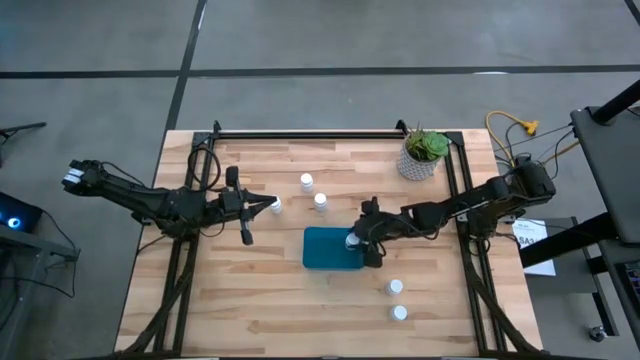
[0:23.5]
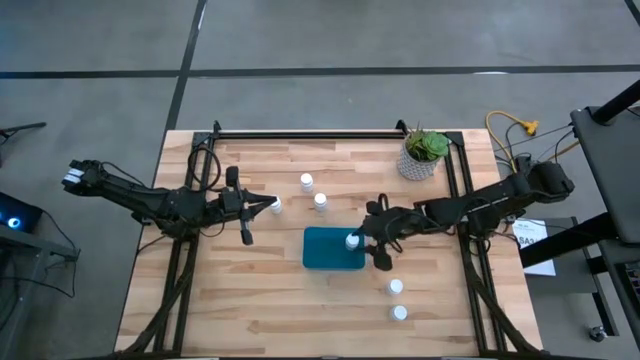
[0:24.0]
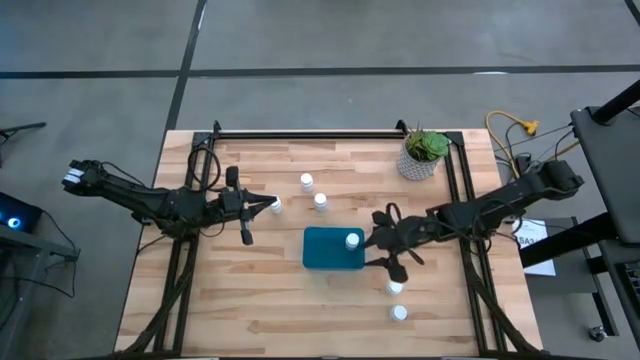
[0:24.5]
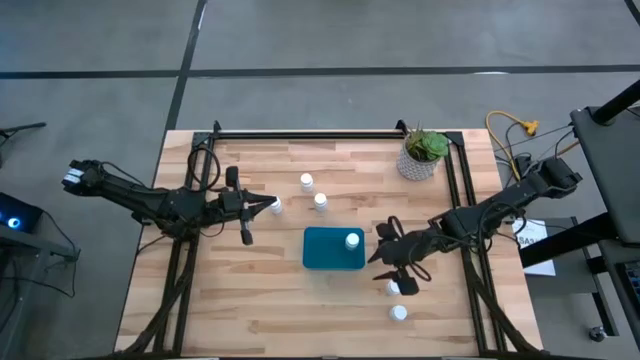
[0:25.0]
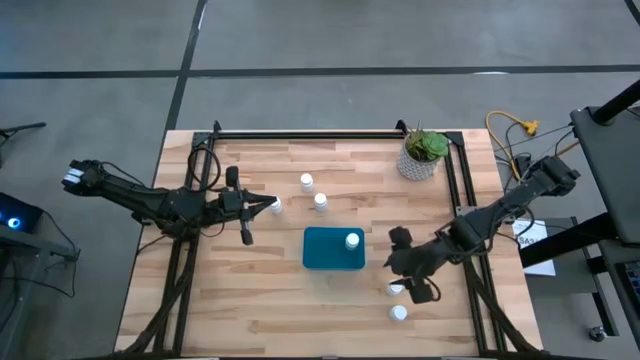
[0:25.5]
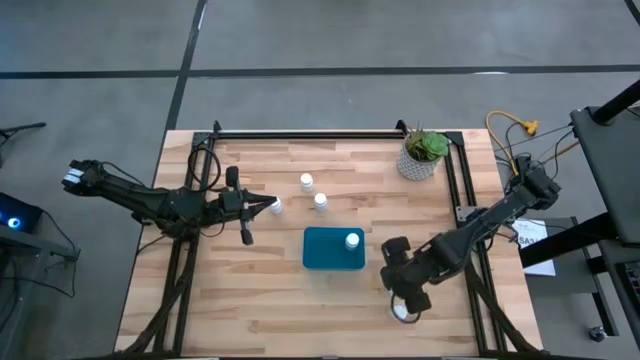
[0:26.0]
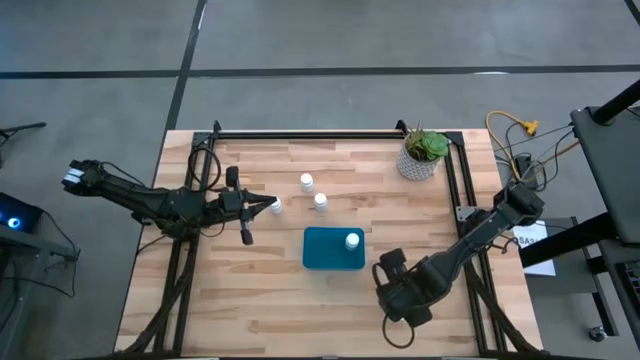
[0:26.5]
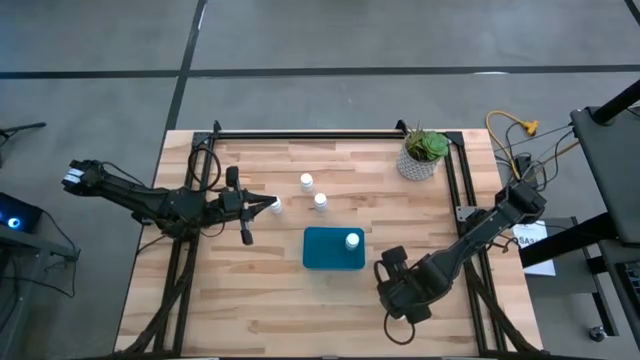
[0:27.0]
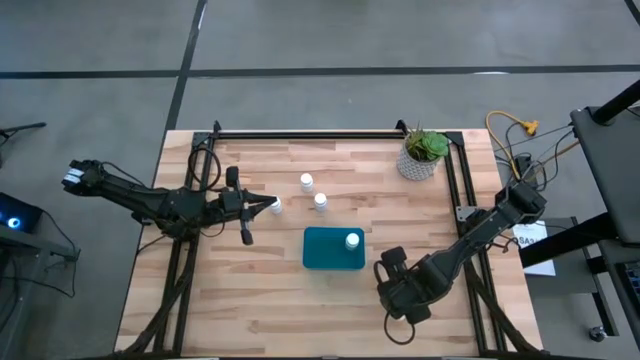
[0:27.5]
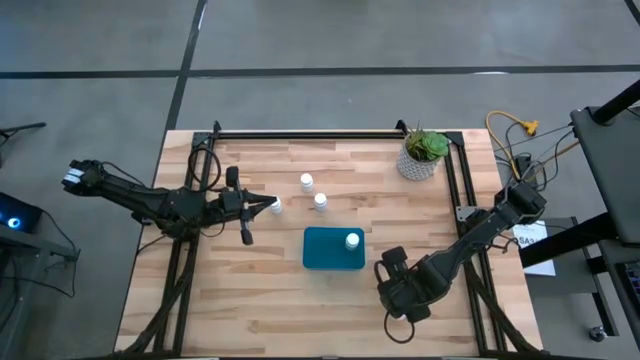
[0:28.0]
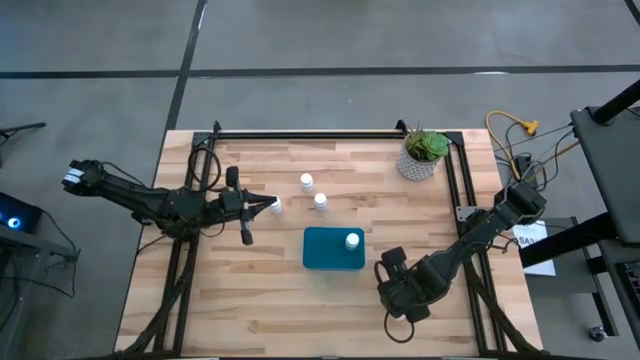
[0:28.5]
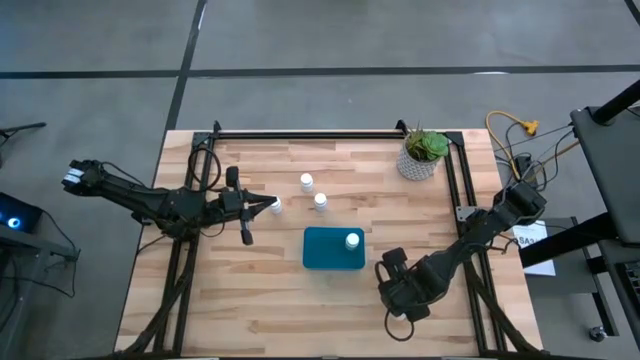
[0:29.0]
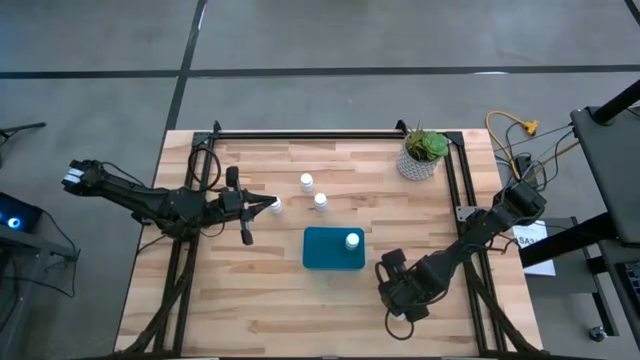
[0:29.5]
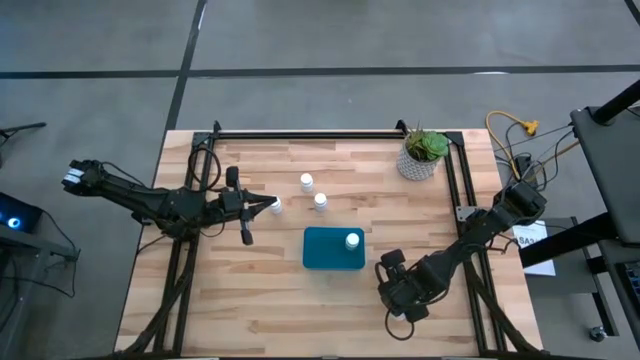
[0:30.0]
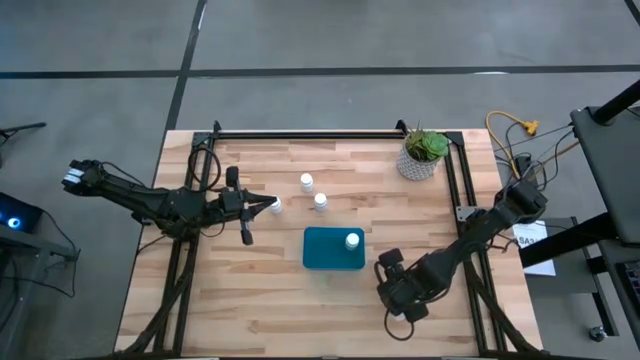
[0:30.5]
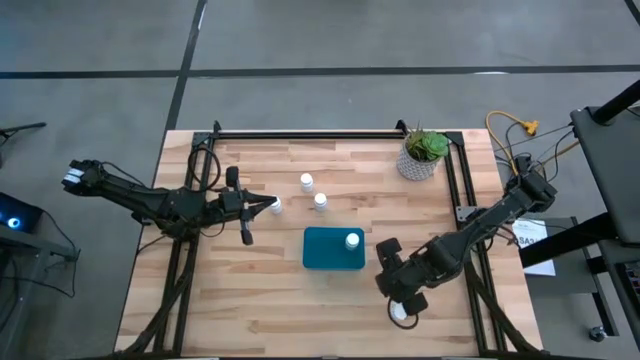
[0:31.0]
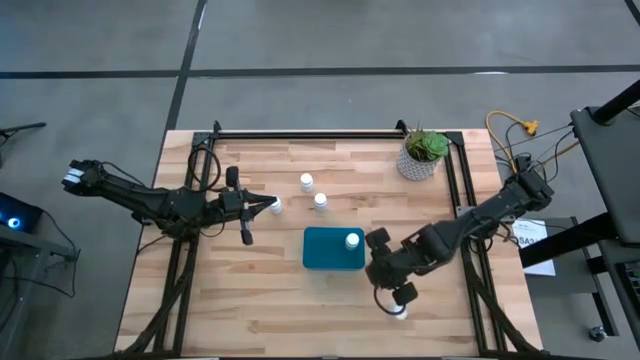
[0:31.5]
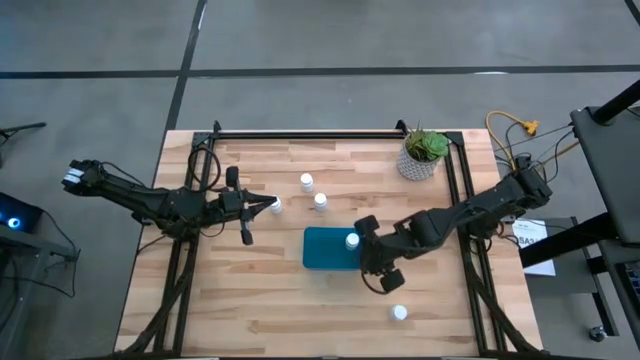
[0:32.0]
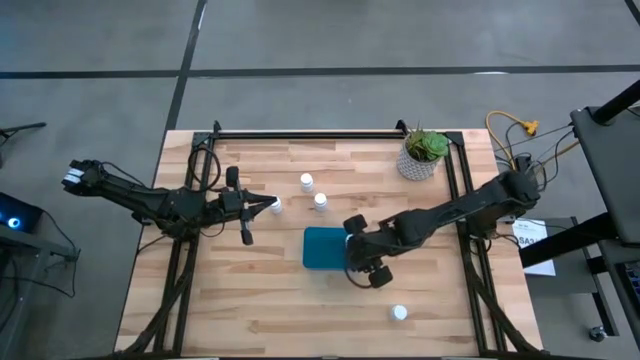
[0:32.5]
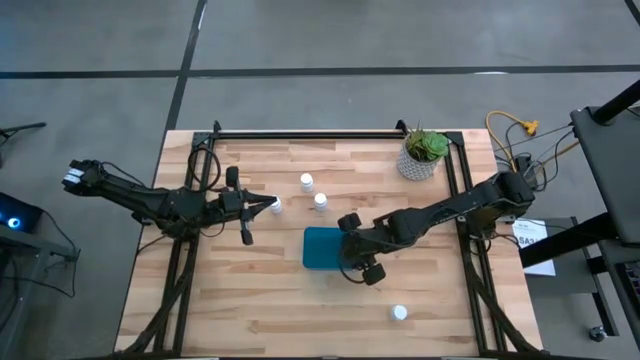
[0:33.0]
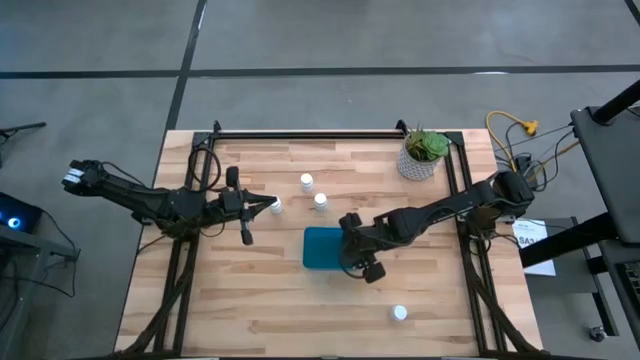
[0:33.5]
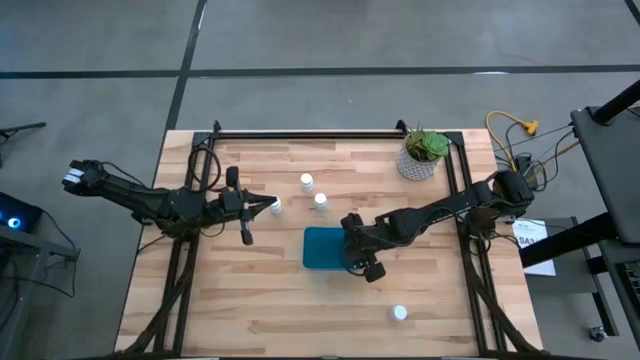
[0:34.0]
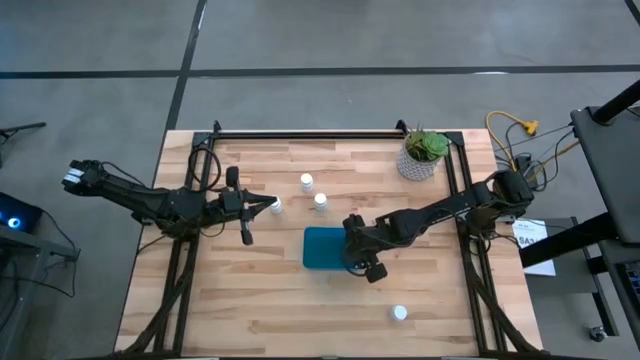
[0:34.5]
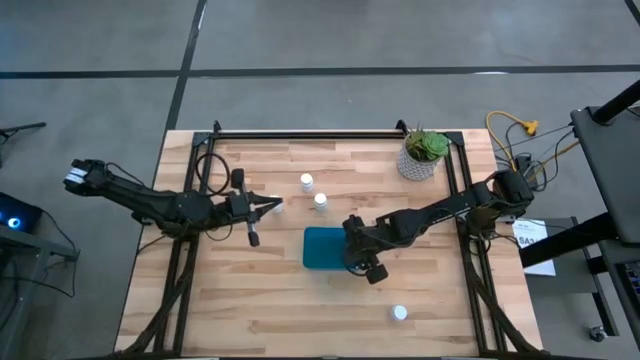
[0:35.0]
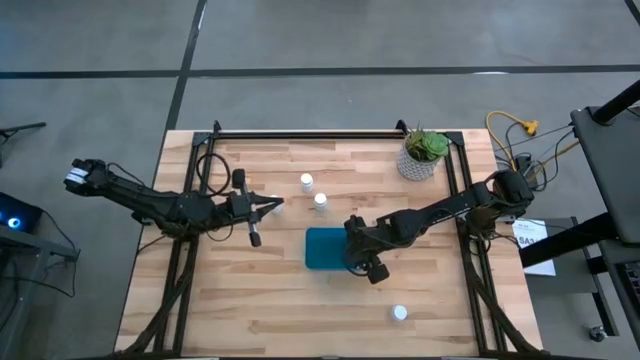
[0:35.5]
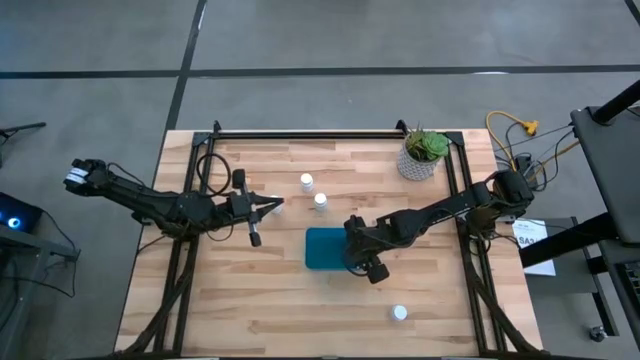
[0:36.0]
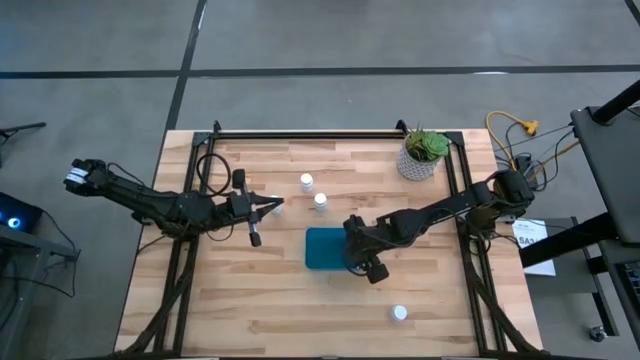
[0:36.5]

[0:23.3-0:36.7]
Task: Pick and place pill bottles into a basket
Put the white pill bottle into the blue bin

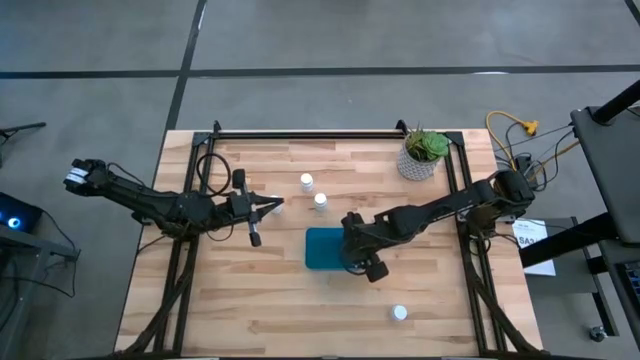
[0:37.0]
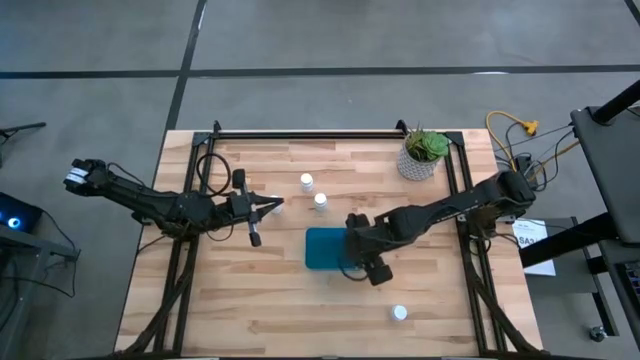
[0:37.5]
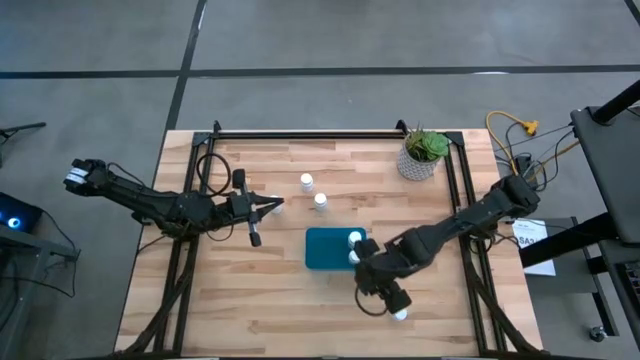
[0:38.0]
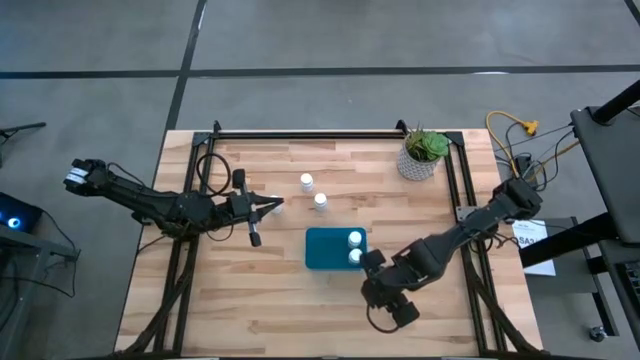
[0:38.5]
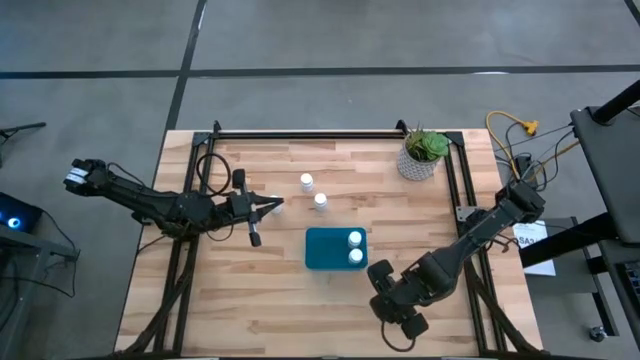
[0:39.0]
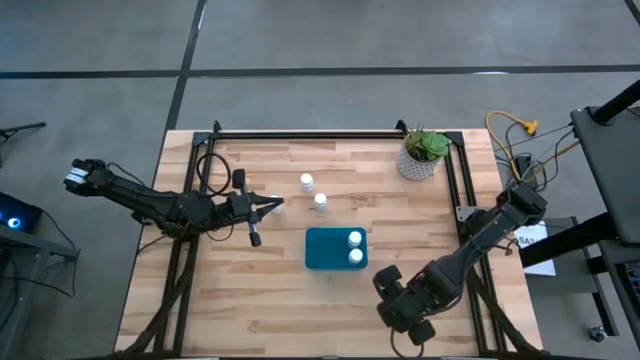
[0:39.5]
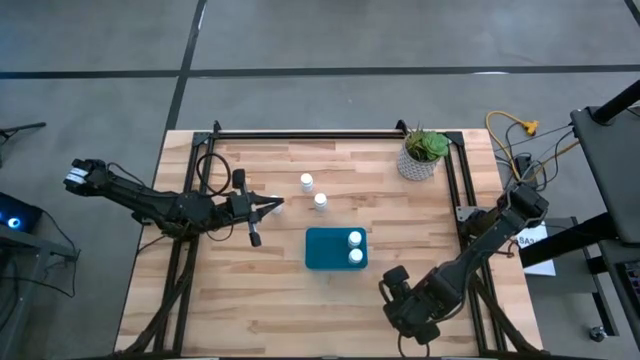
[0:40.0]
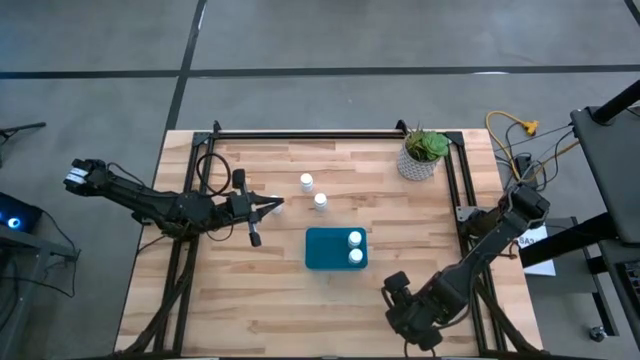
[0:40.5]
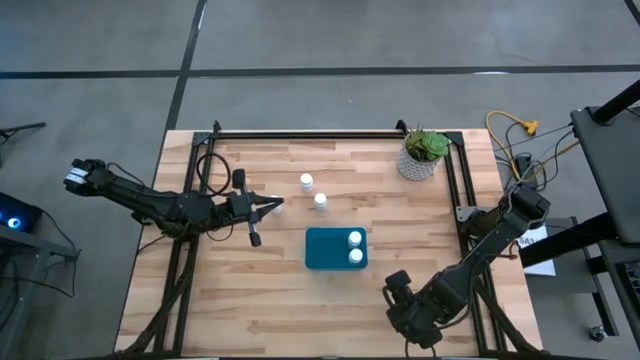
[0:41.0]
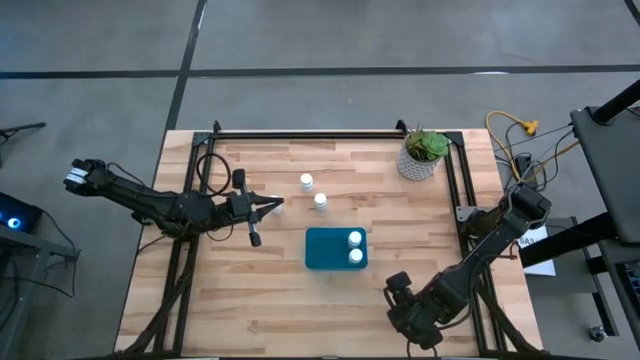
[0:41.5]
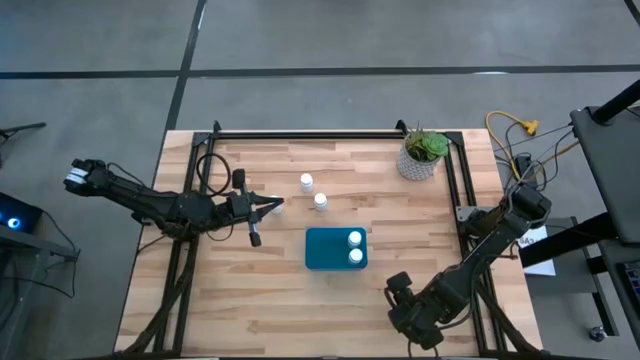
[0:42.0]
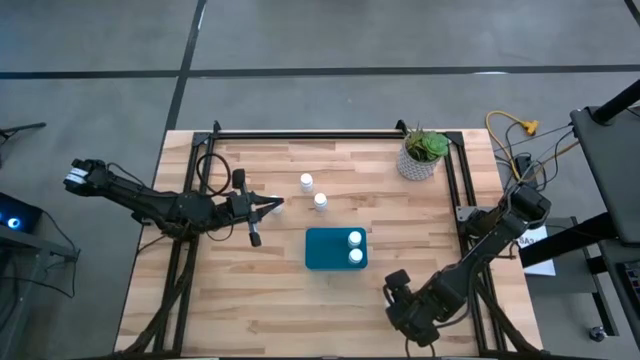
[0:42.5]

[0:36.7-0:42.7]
Put the white pill bottle into the blue bin
